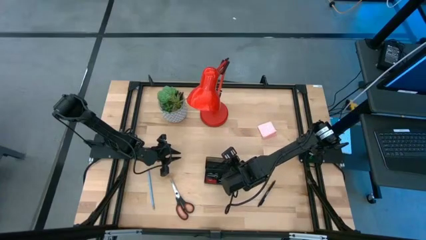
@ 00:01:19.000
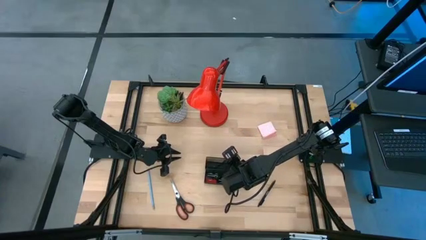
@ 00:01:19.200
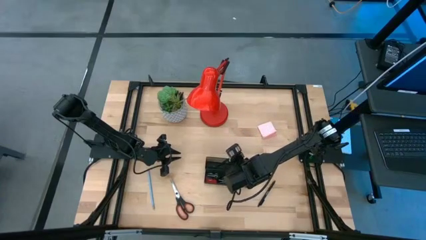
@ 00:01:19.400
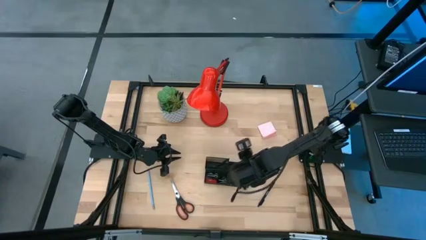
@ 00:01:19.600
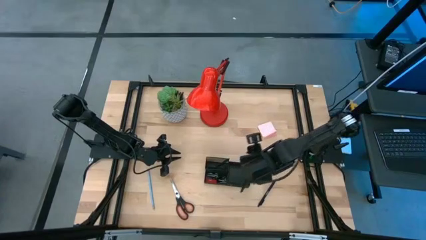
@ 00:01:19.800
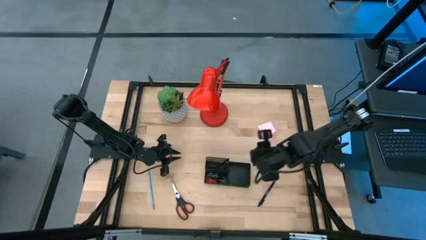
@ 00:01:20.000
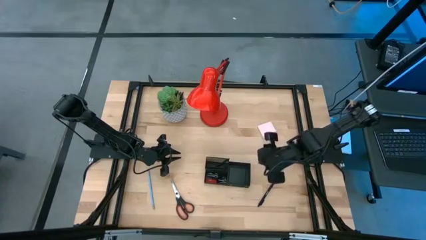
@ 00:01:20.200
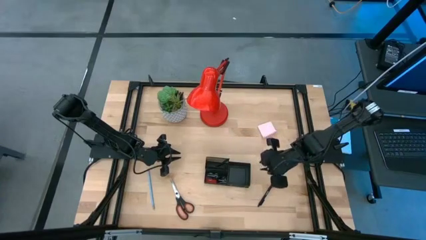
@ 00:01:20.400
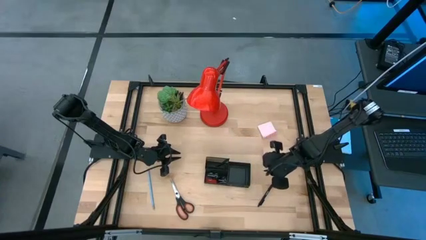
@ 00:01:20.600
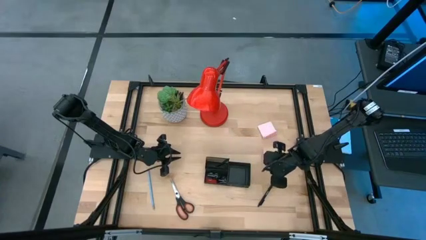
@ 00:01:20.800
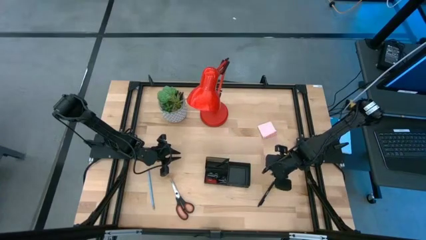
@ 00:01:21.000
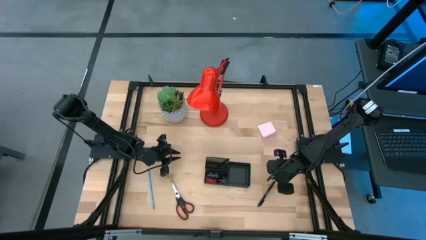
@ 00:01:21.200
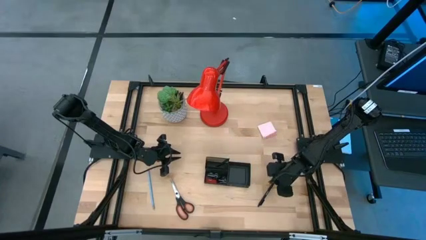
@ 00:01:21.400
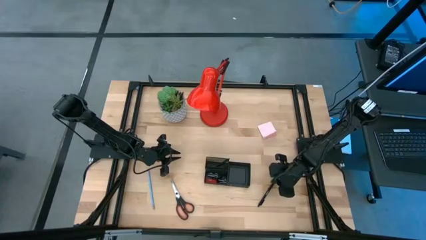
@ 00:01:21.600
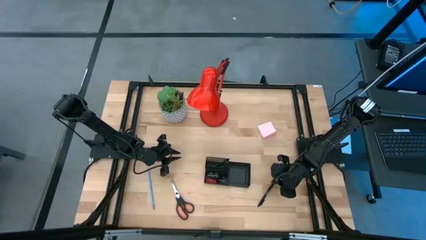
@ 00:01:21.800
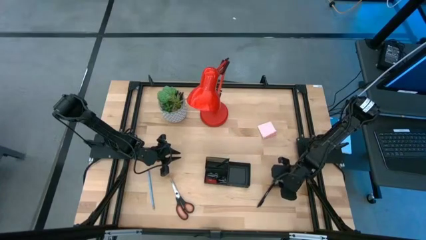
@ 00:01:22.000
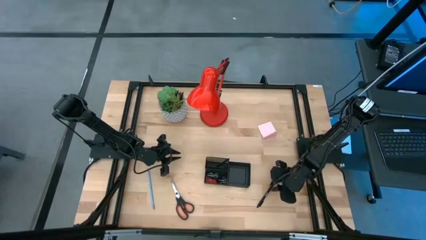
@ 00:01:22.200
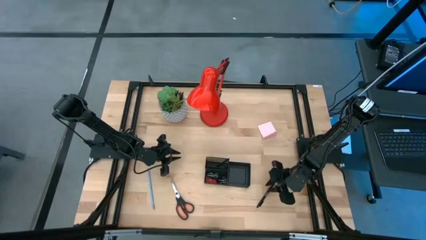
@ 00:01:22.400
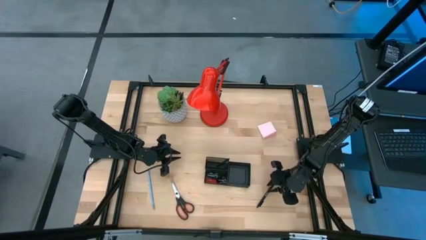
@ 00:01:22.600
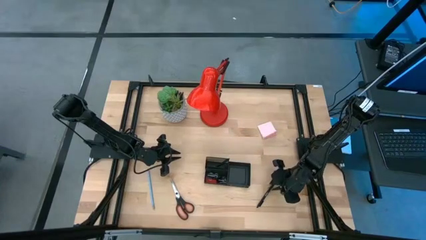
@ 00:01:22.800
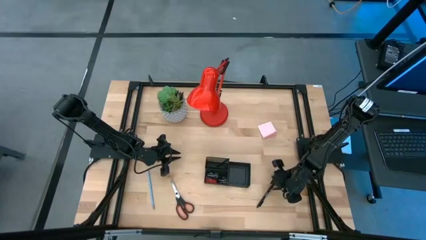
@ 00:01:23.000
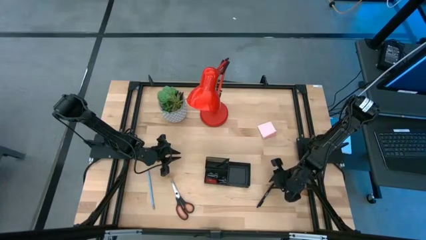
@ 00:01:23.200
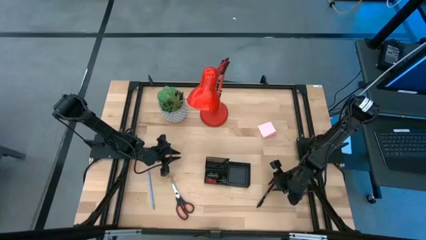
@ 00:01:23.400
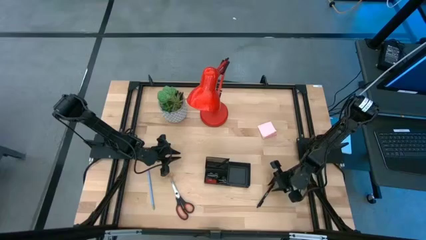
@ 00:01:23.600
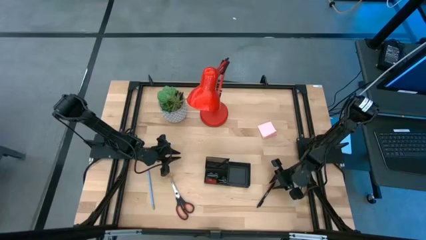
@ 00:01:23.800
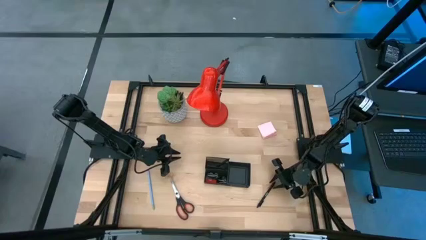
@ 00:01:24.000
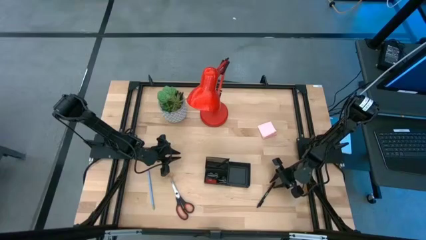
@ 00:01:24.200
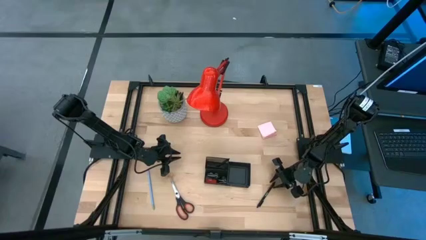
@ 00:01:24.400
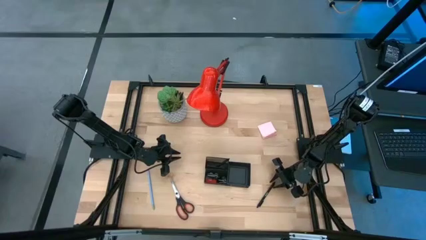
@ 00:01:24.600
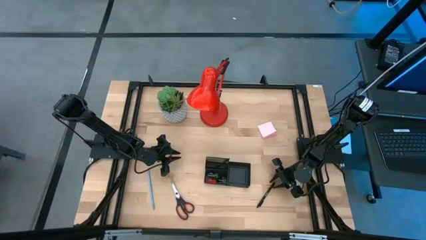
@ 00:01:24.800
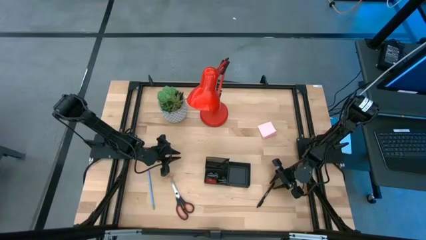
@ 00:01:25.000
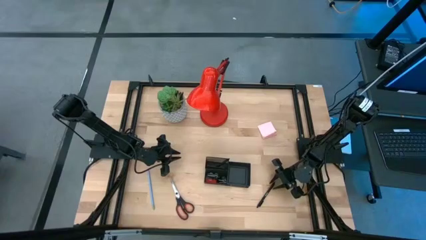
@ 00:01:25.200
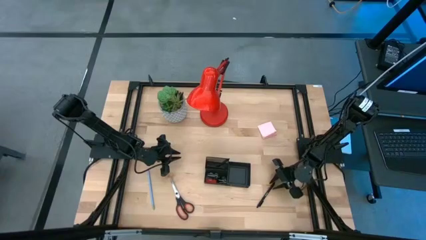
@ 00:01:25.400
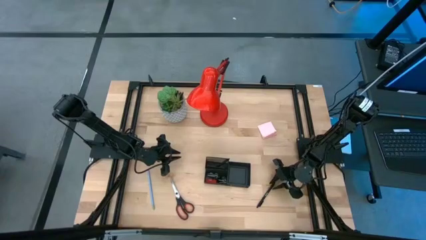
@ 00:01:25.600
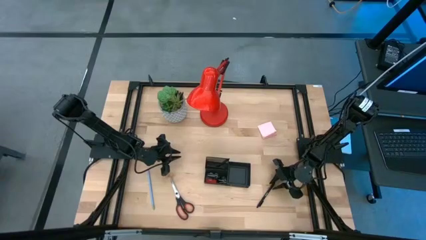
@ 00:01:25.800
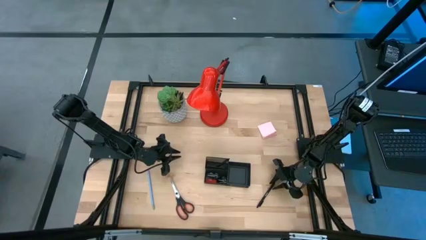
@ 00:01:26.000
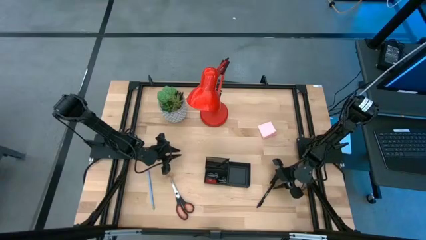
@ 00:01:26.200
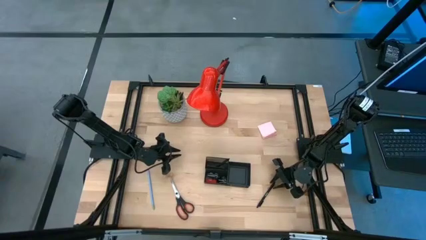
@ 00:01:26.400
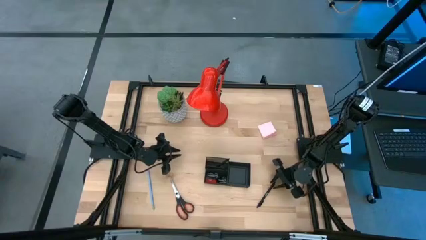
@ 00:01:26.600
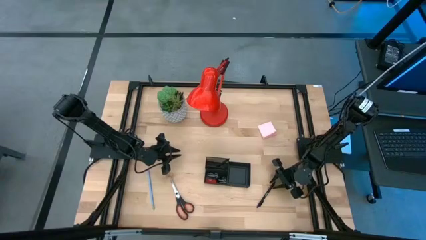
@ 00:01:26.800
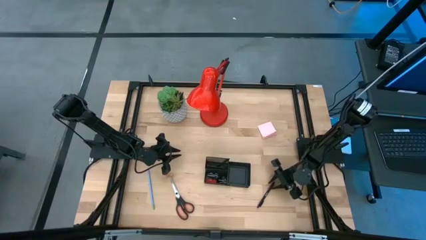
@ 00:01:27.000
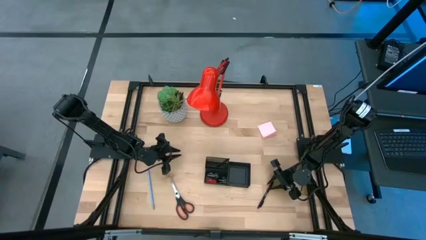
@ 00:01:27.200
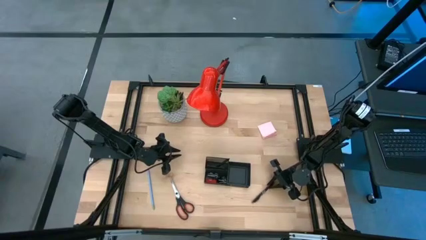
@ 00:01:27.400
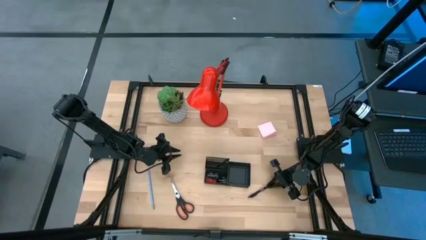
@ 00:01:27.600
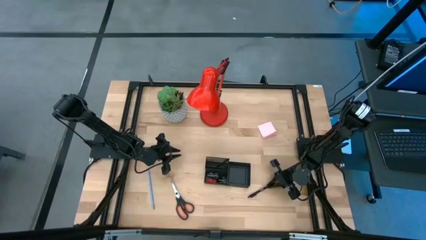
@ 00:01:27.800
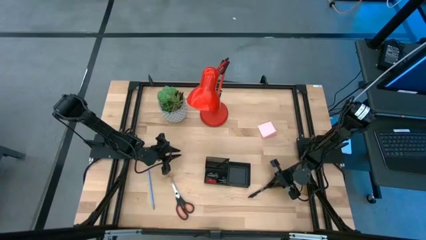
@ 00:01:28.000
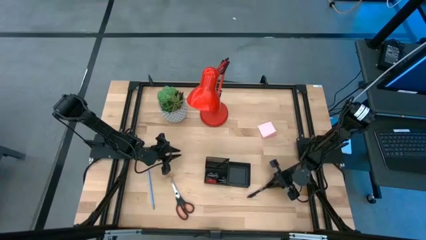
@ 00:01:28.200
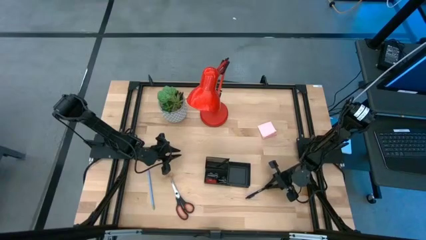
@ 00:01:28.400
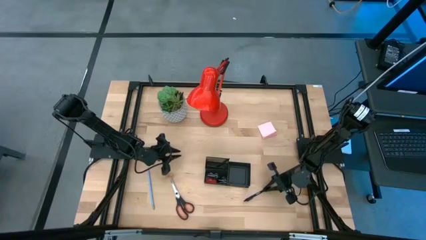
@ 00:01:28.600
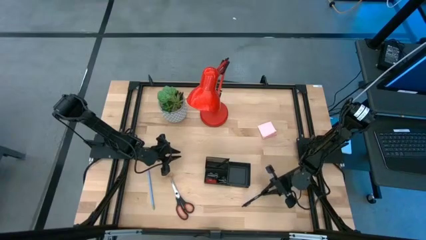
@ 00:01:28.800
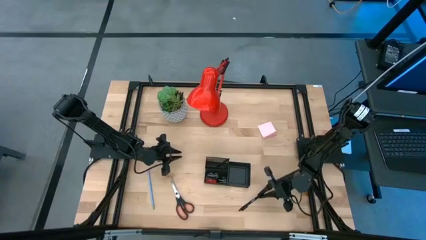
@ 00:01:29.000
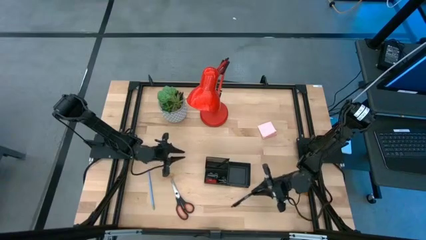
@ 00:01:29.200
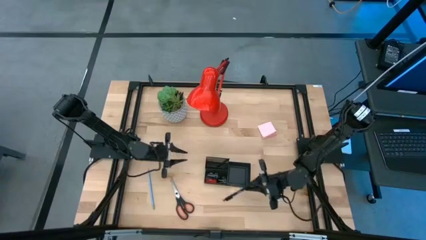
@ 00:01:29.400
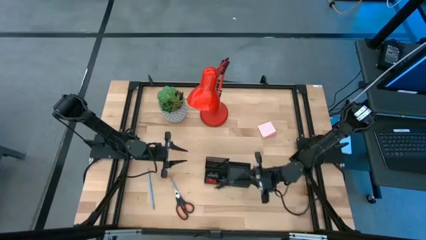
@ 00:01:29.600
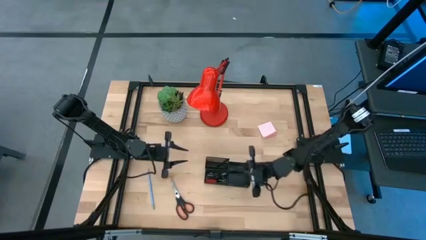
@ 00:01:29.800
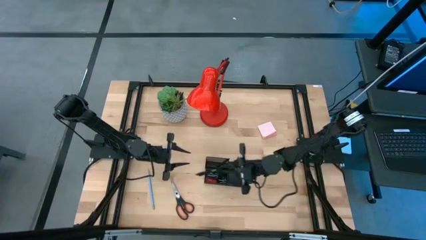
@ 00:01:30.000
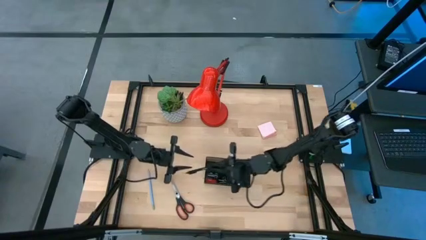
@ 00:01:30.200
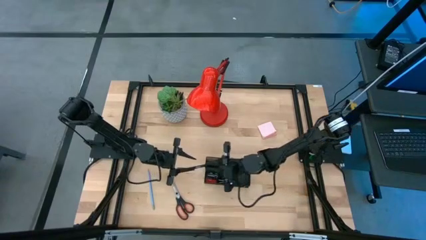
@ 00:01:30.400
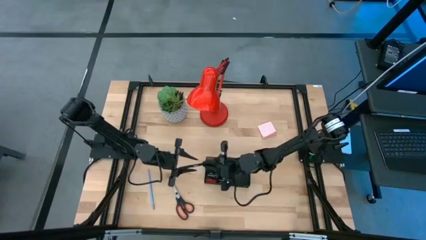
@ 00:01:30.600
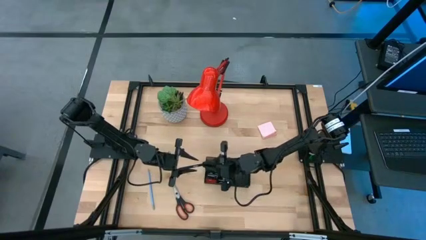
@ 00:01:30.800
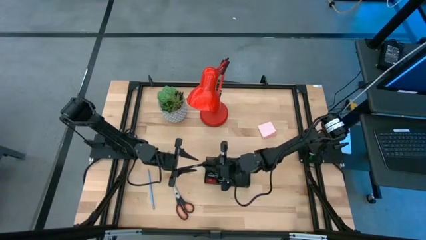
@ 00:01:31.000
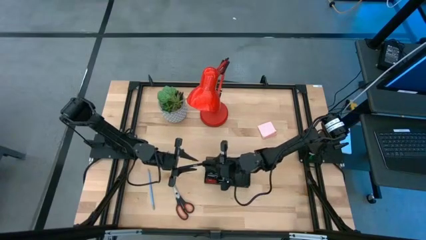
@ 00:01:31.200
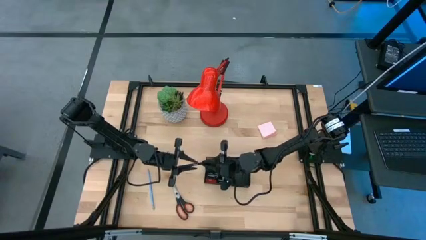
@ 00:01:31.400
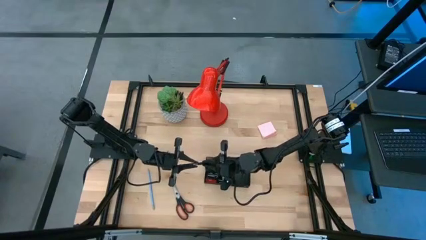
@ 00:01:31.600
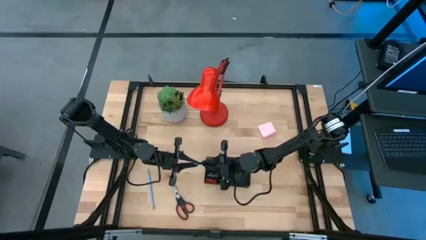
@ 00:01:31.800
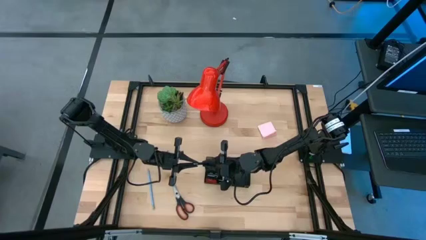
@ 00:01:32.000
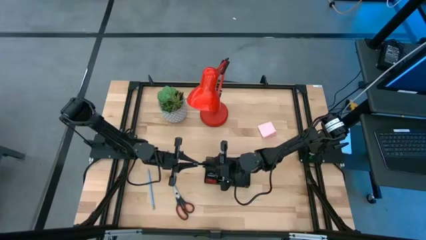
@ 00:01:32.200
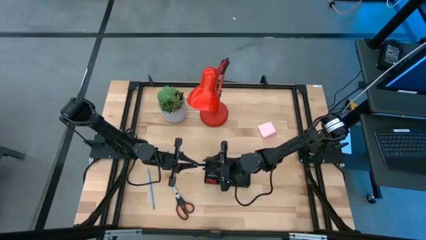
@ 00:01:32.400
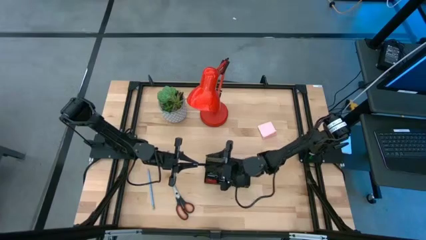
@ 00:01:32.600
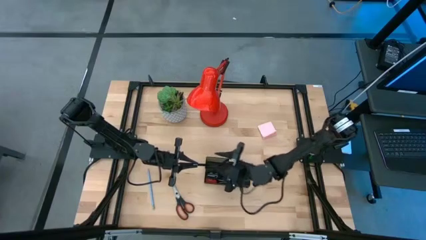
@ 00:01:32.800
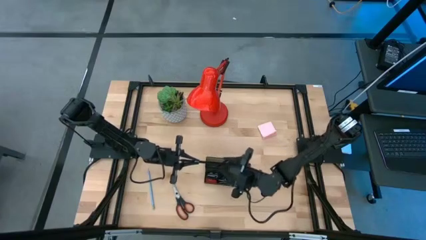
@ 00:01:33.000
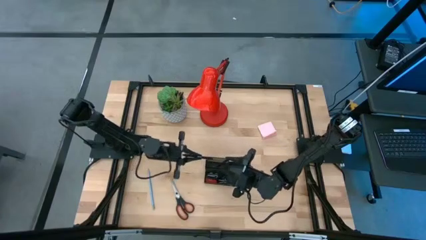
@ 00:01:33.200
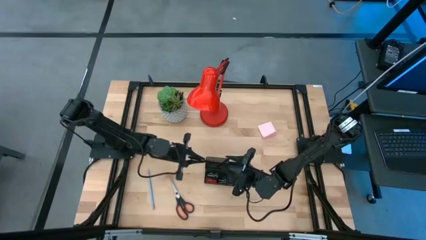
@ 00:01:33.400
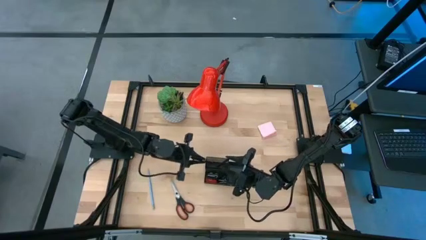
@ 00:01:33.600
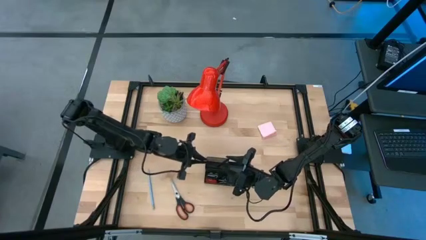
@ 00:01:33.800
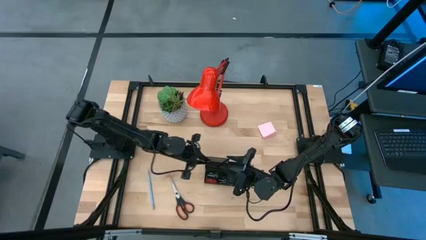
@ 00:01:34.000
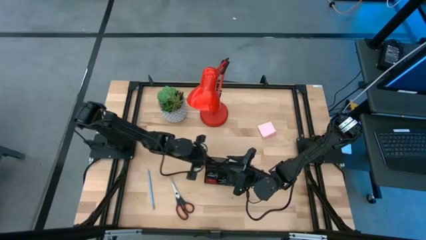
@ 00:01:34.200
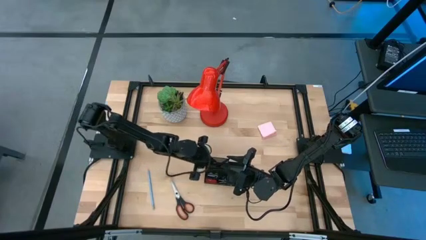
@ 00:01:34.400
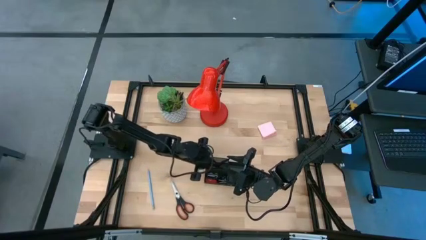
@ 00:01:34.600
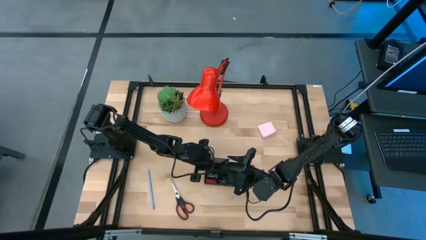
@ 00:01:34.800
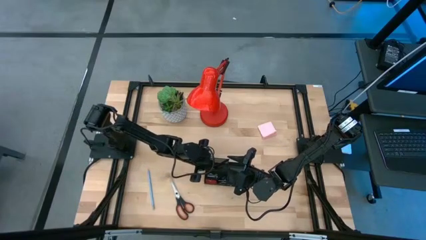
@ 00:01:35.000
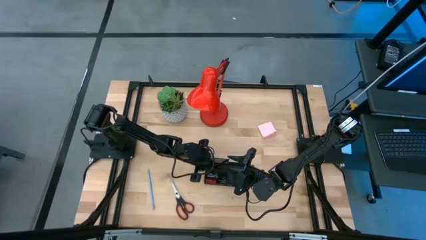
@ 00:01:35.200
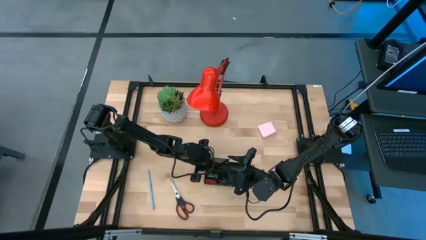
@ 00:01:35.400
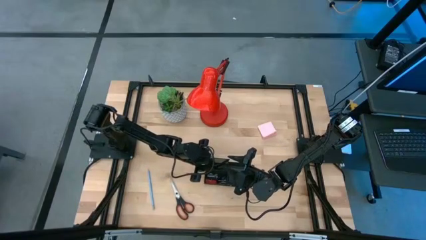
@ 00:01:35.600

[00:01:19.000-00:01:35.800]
Task: Pick and place office supplies into organizer
Put the black pen into the black desk organizer
